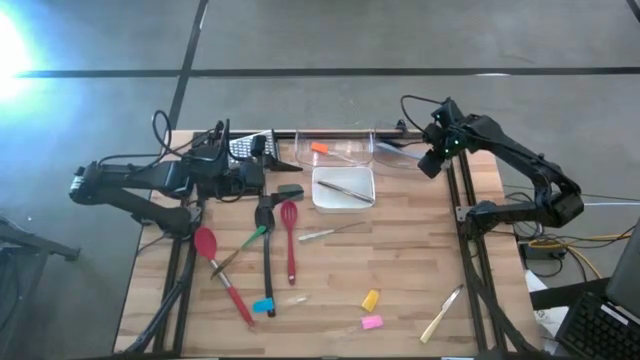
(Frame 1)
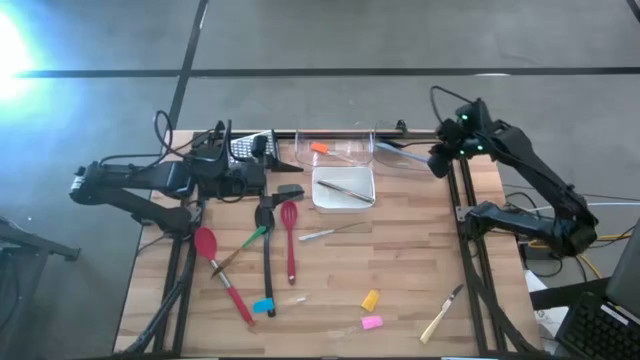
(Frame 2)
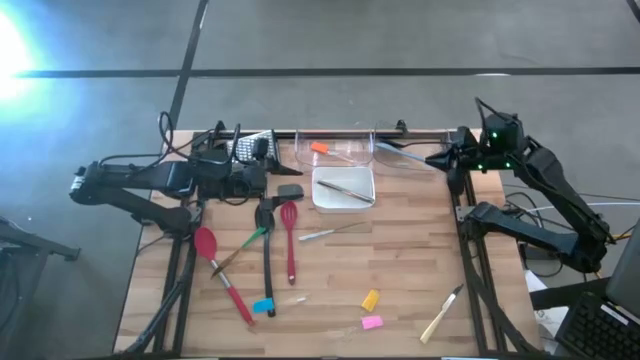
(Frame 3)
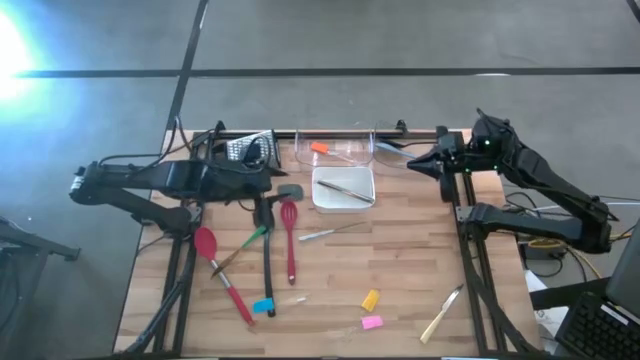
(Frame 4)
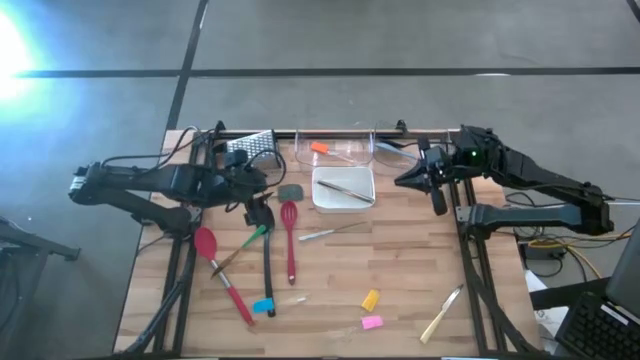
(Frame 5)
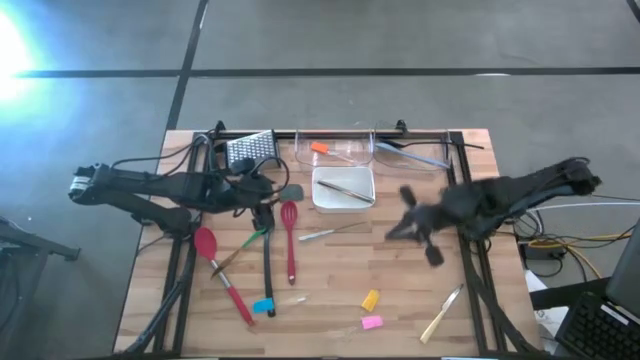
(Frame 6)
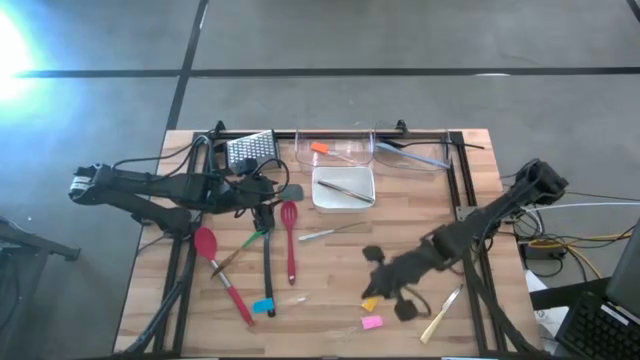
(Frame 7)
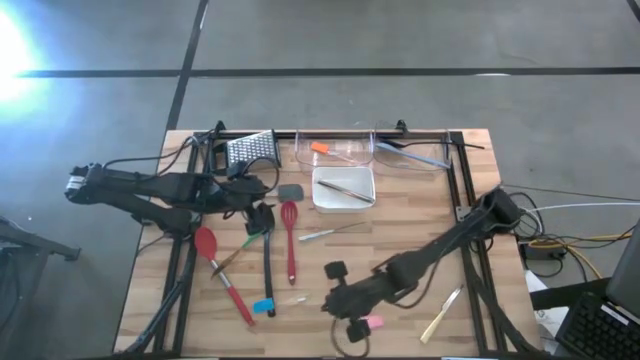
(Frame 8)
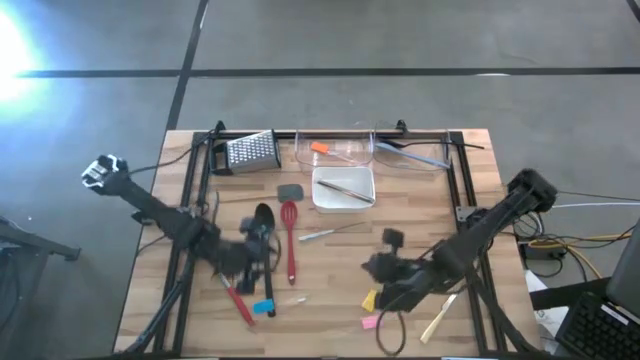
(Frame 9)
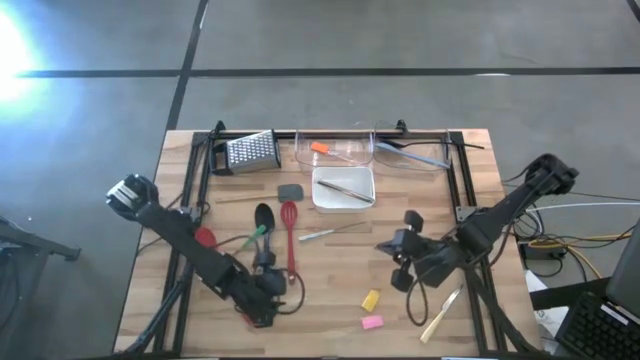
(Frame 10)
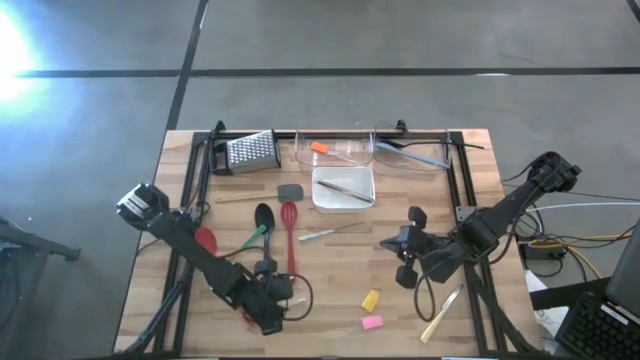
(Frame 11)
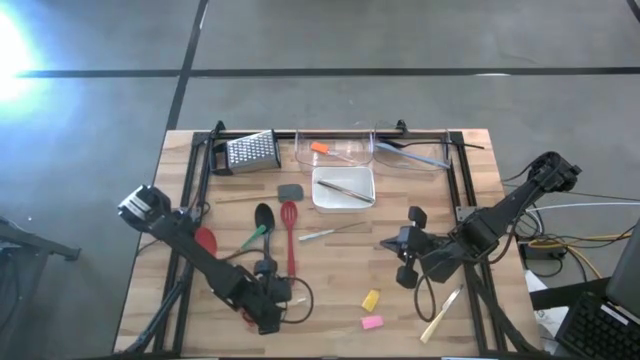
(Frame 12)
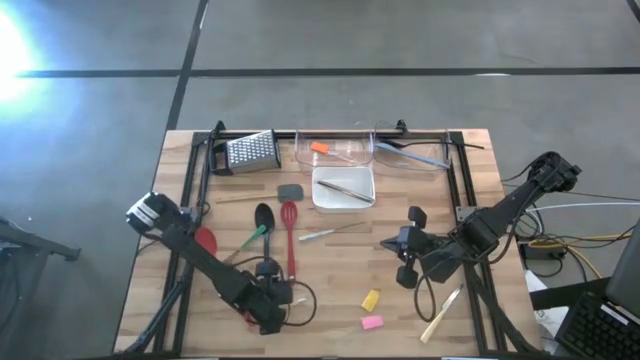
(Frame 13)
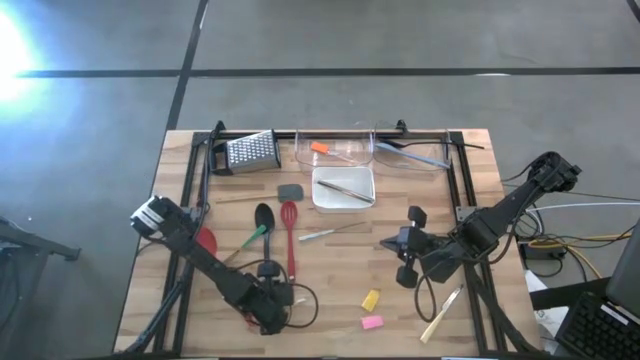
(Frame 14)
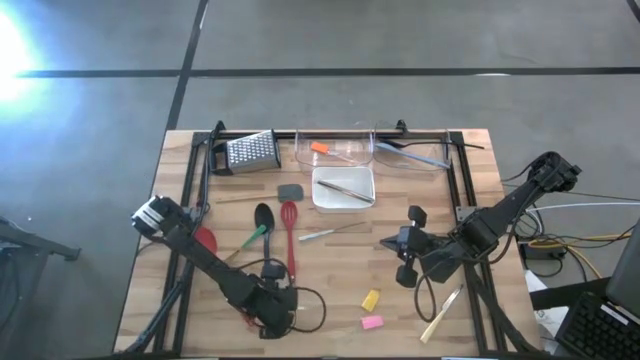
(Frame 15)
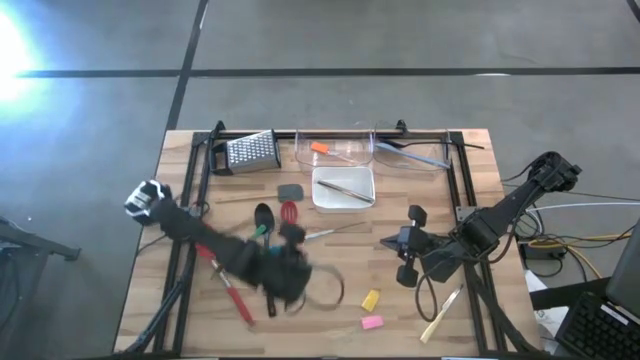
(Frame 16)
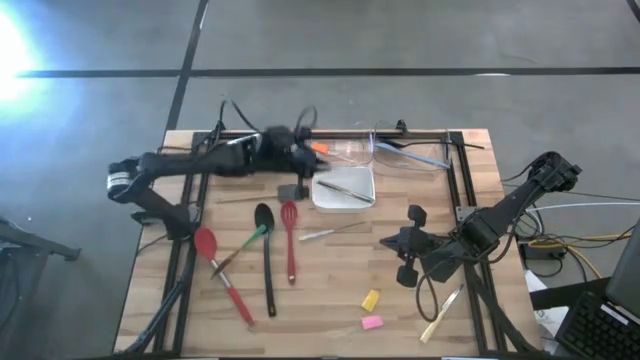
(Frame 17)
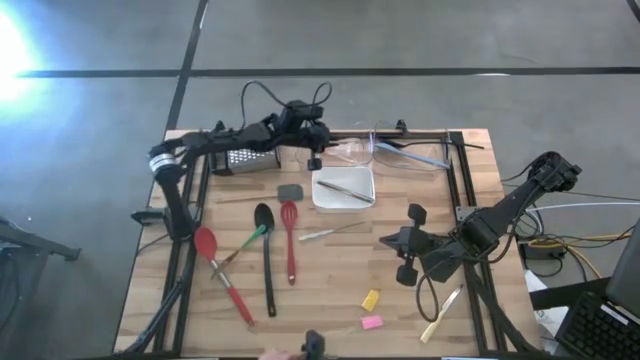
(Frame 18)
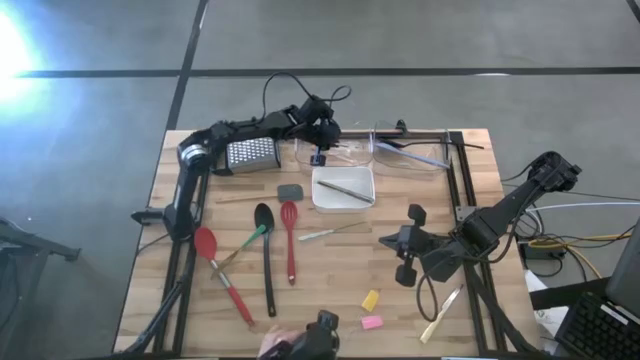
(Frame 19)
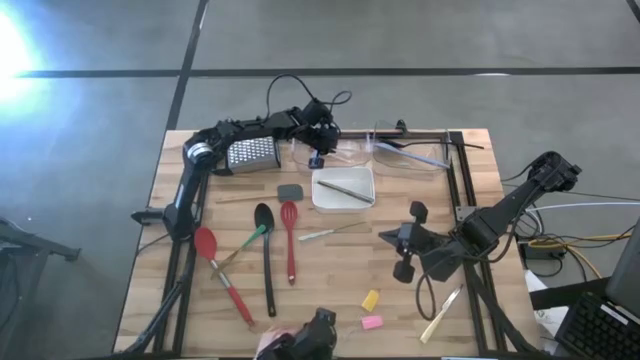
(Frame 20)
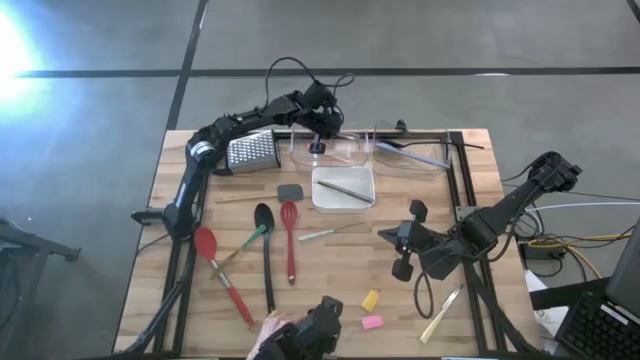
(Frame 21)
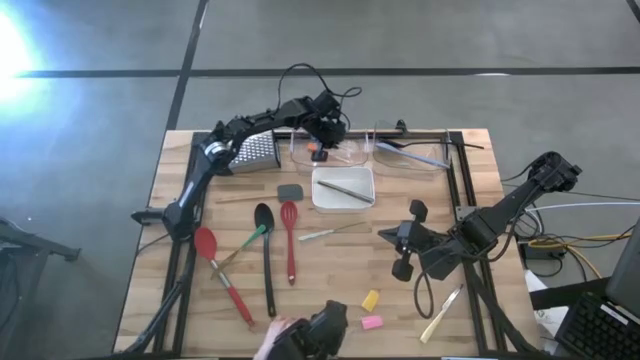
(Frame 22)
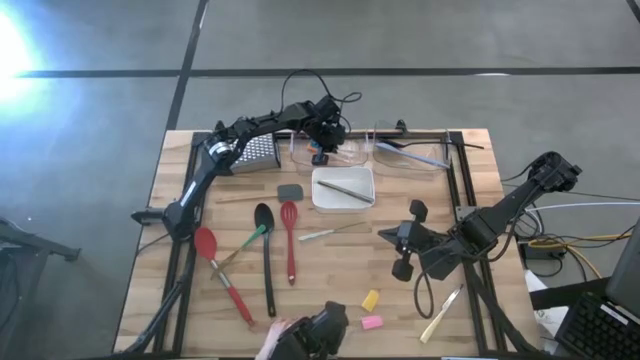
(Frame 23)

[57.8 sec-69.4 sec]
Task: Pick & Place Kitchen Items
Put the blue spatula into the left transparent bin

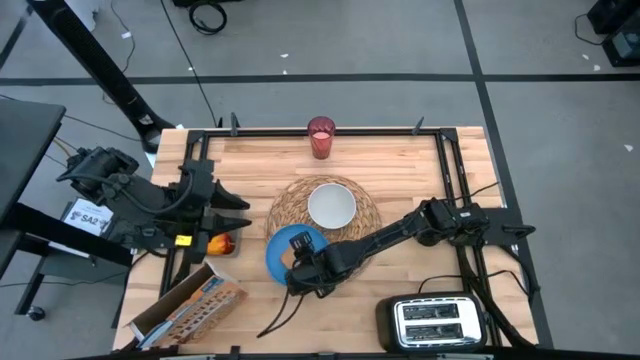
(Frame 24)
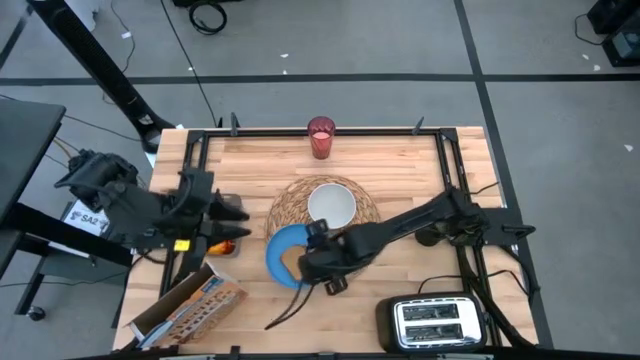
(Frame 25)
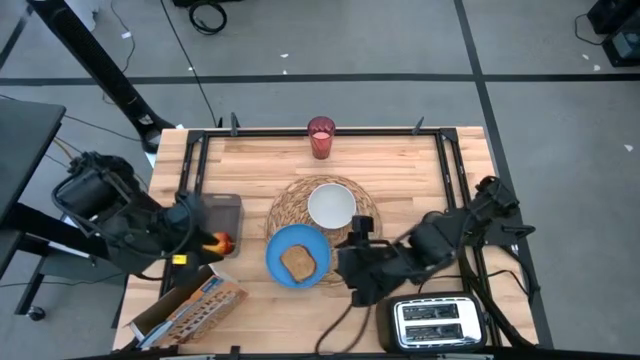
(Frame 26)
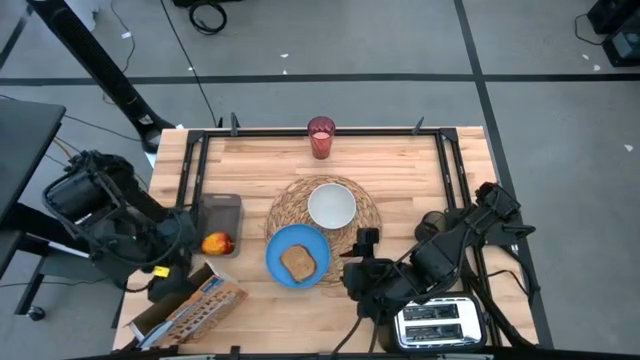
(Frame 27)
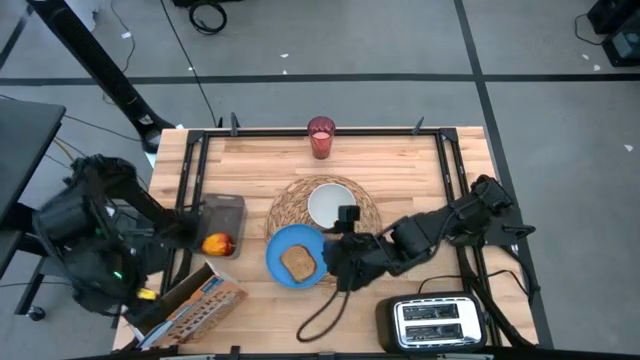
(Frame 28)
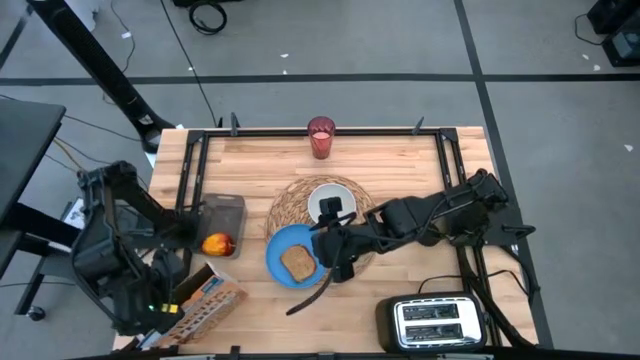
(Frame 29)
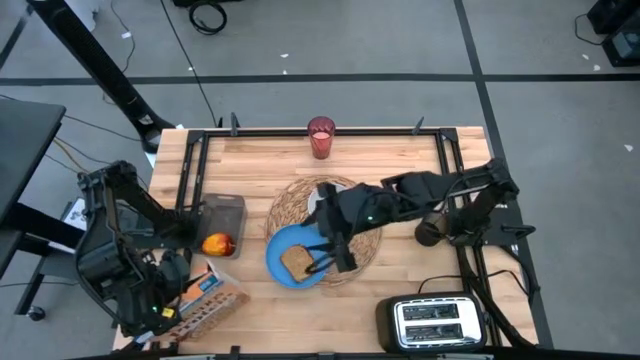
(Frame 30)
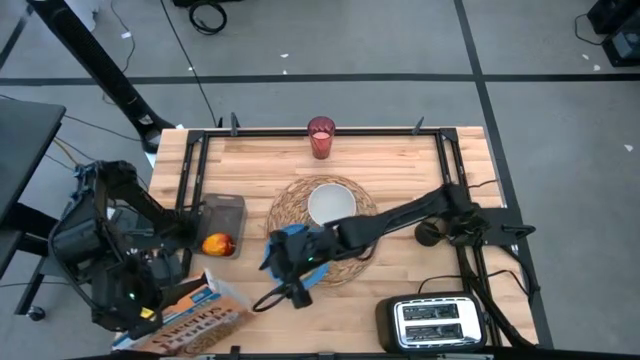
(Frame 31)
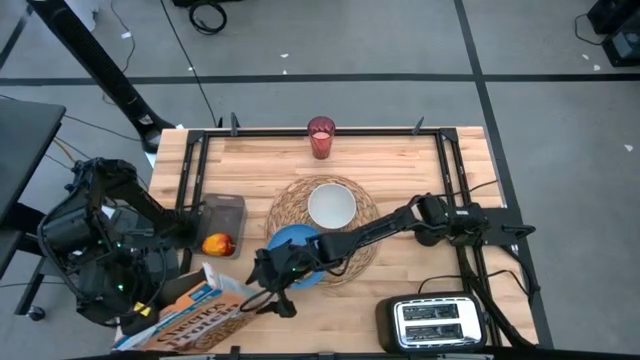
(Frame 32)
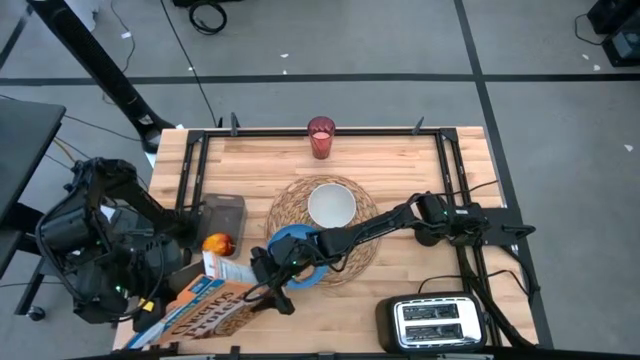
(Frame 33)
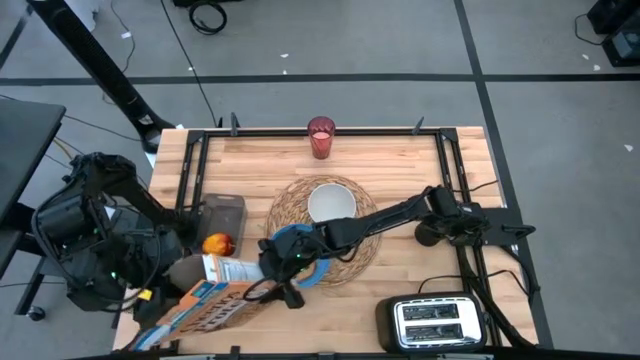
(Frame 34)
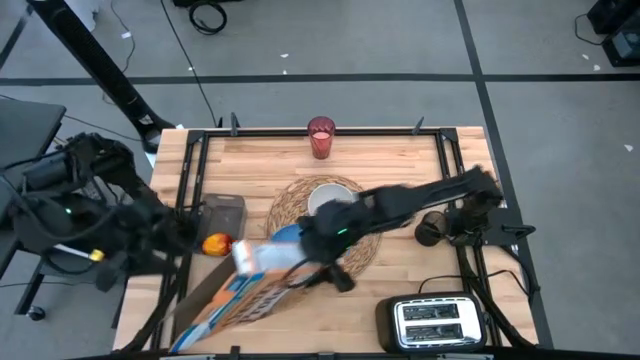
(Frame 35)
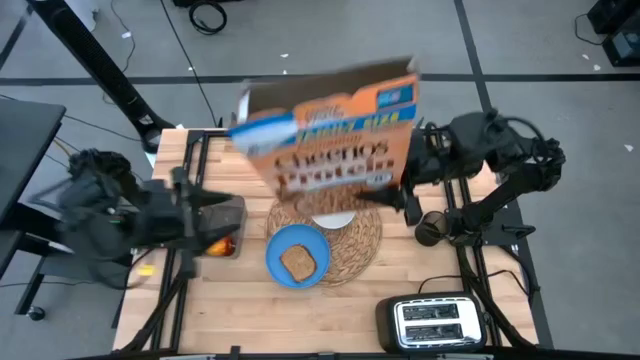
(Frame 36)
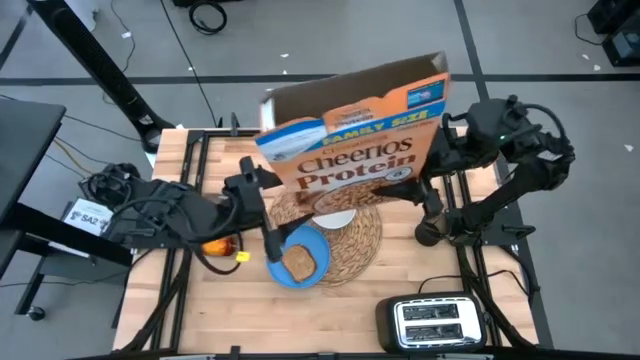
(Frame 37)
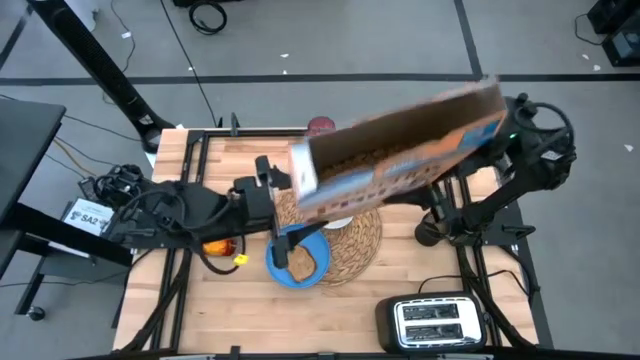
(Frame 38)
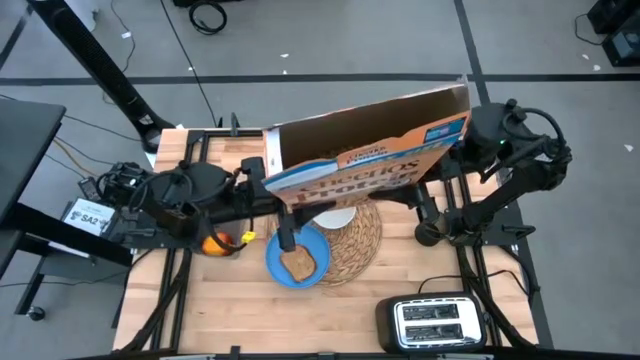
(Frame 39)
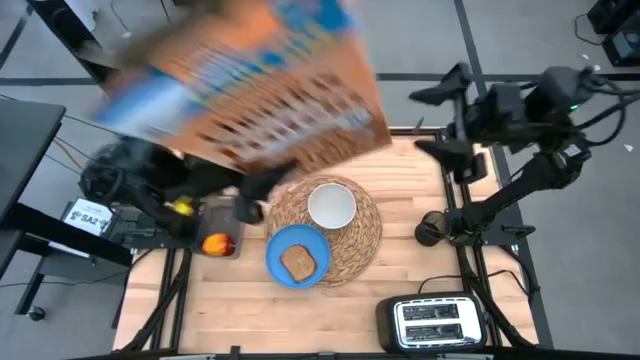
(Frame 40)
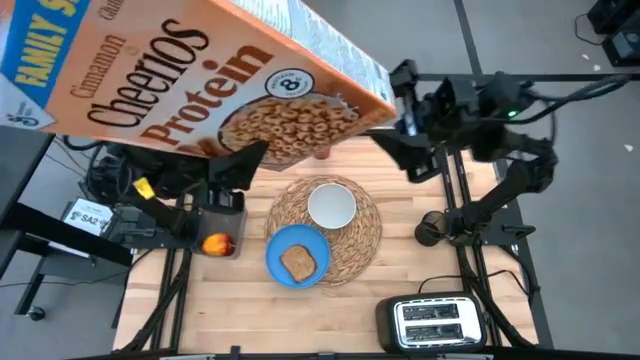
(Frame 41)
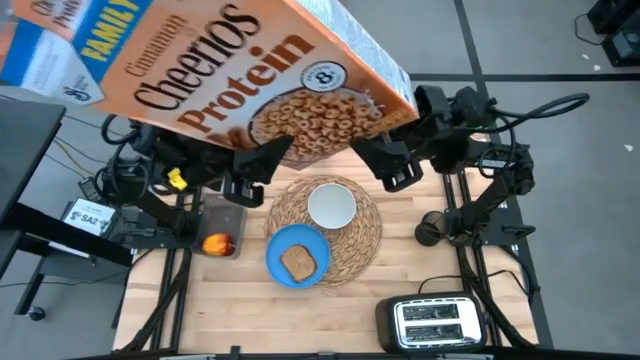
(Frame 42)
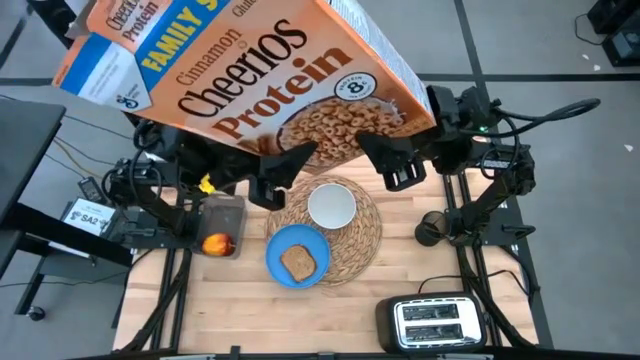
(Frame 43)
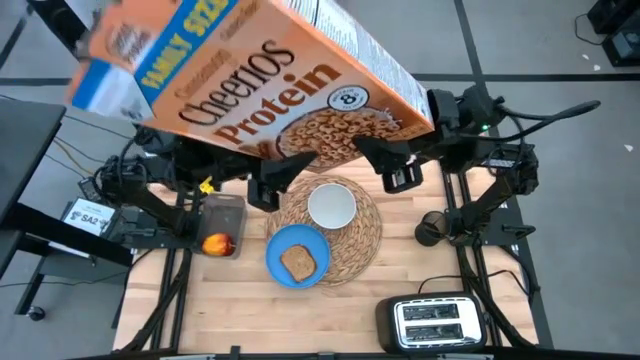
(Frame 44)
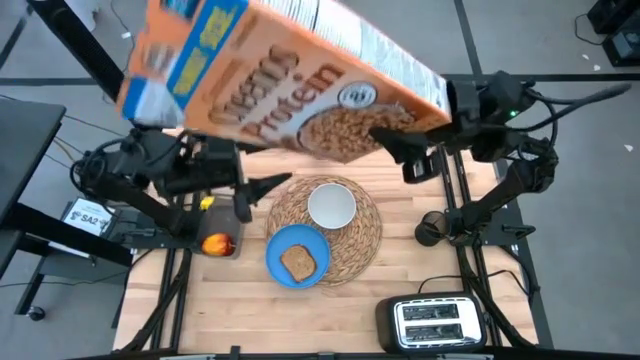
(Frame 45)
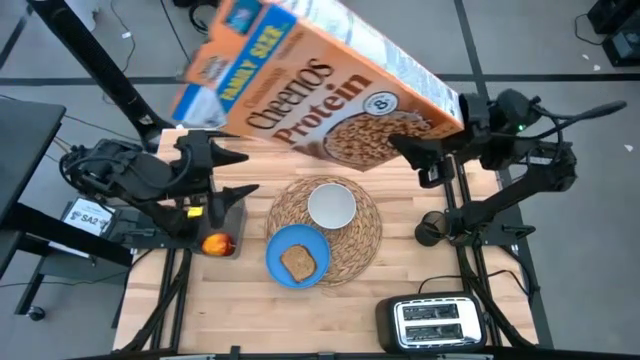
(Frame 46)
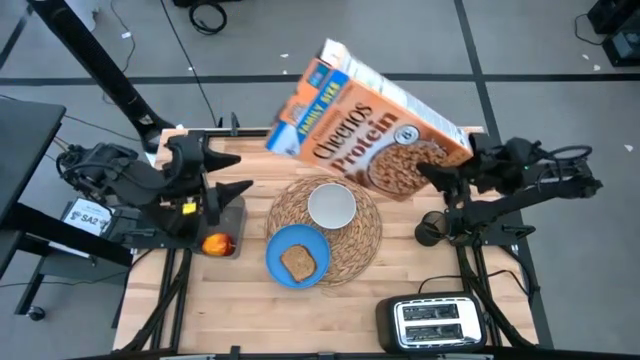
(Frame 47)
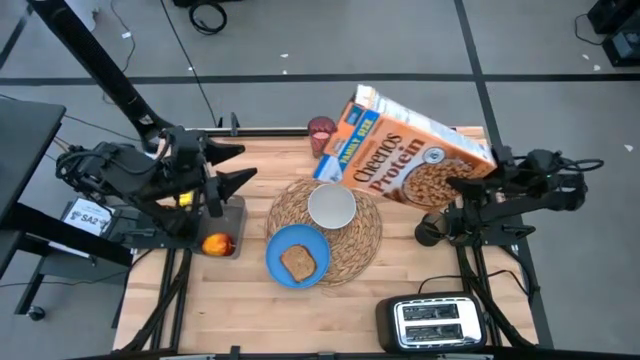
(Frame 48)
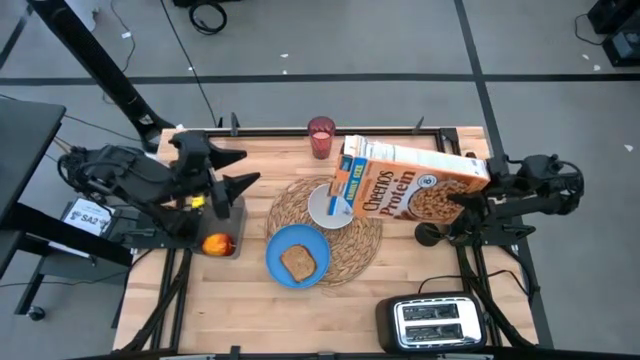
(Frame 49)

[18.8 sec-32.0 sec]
Task: Arrange a breakfast setting
Pour the cereal from the cereal box into the bowl
